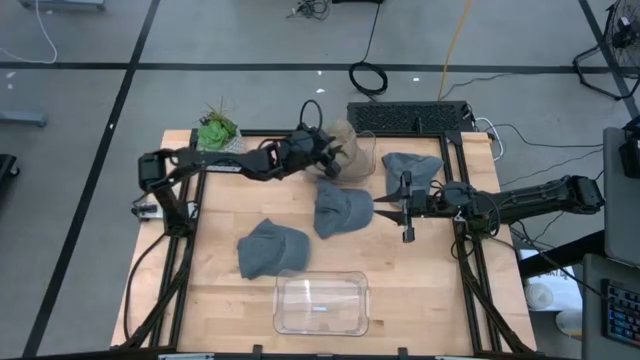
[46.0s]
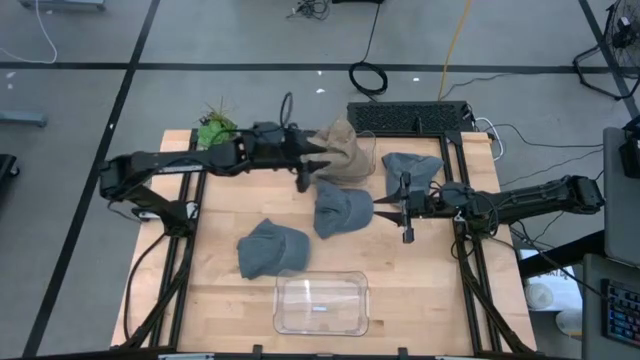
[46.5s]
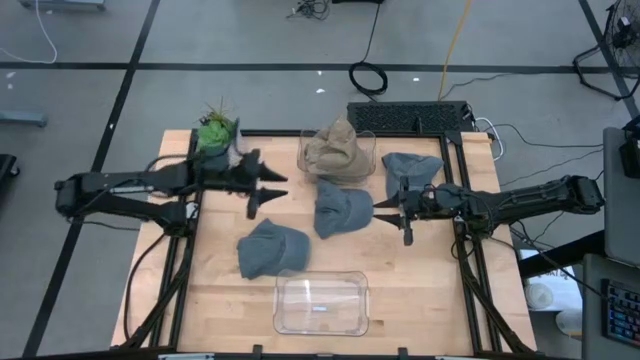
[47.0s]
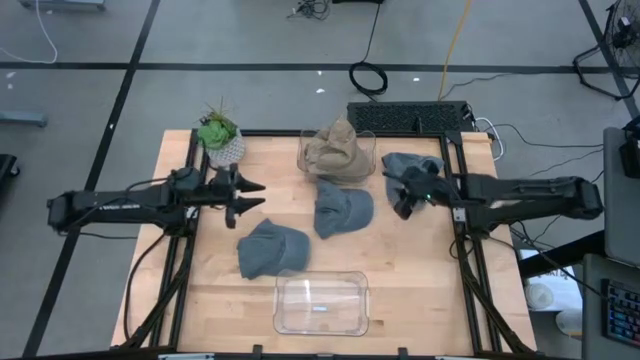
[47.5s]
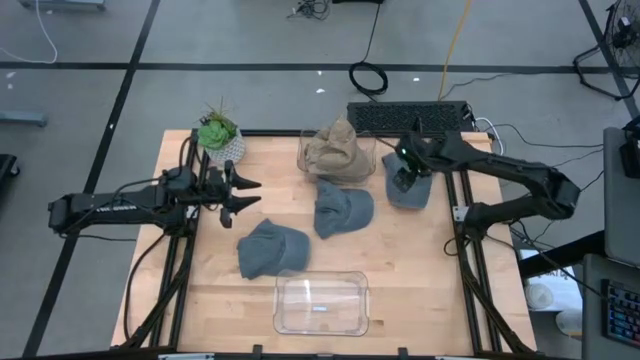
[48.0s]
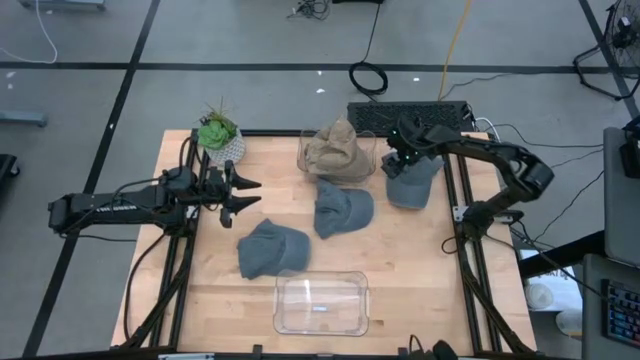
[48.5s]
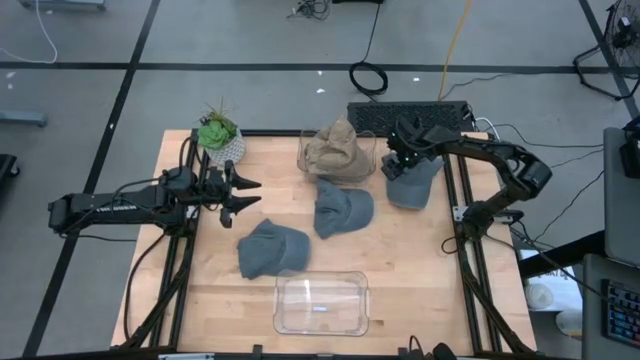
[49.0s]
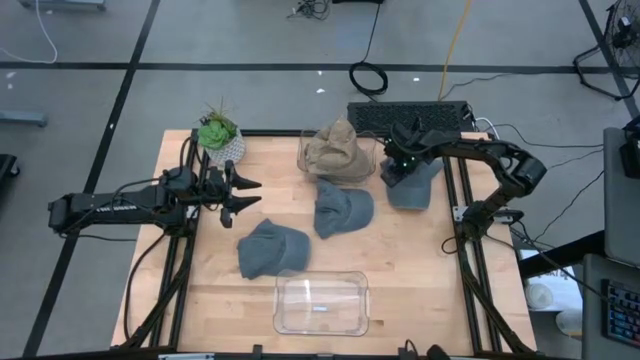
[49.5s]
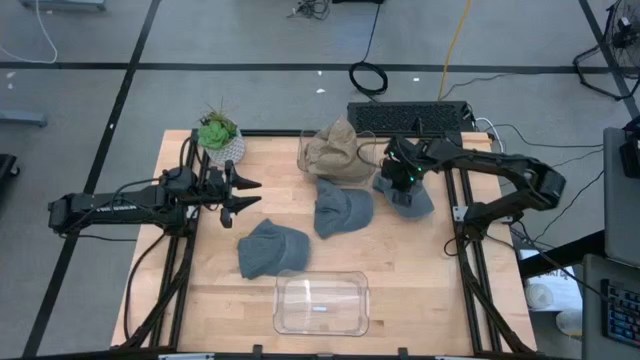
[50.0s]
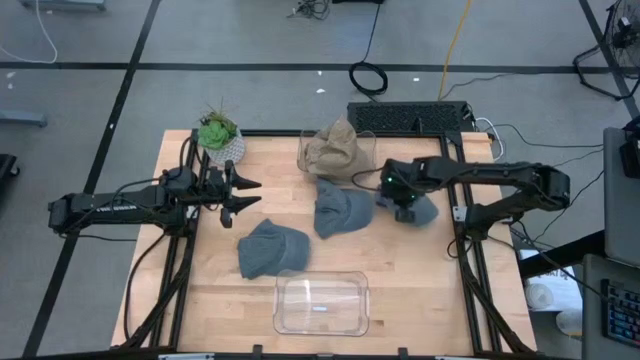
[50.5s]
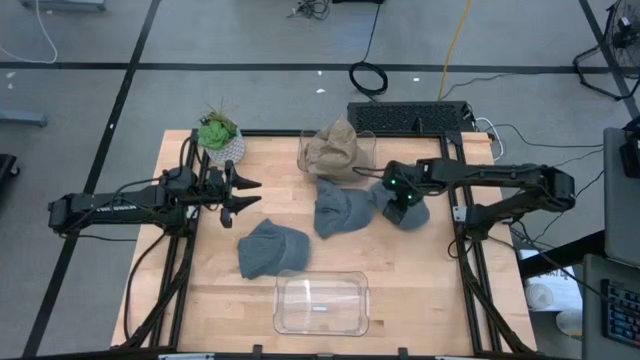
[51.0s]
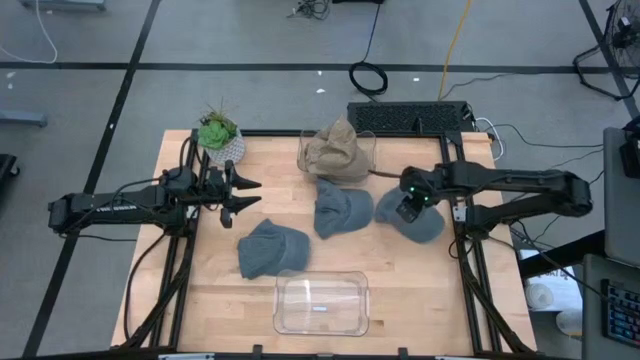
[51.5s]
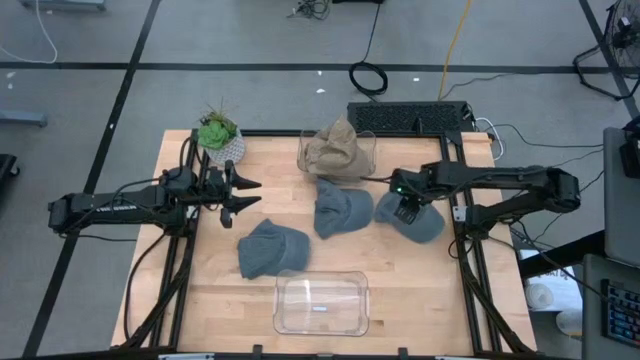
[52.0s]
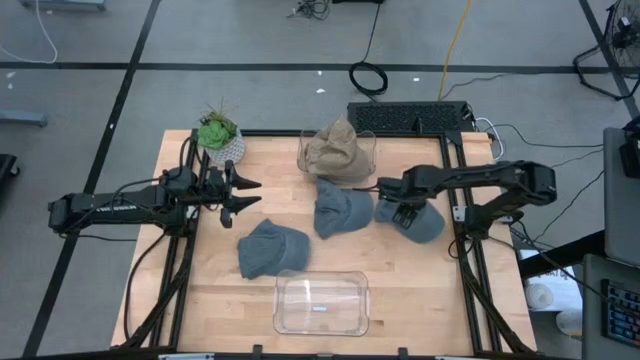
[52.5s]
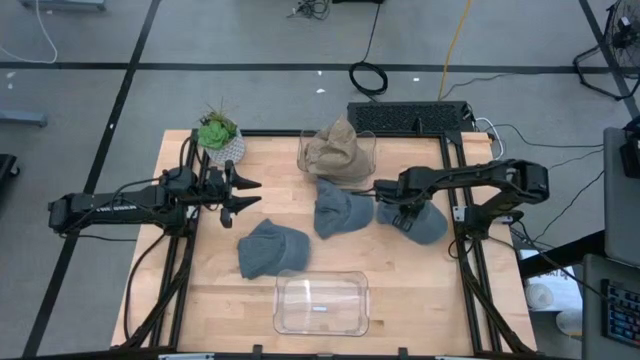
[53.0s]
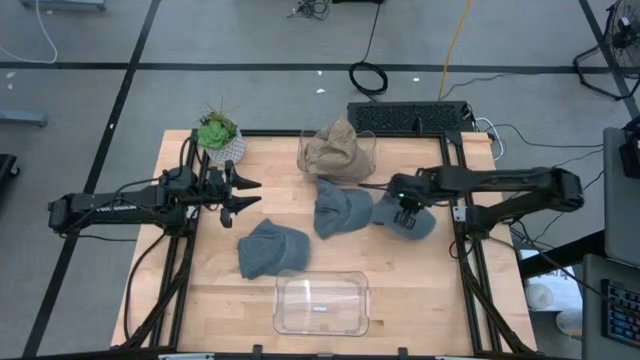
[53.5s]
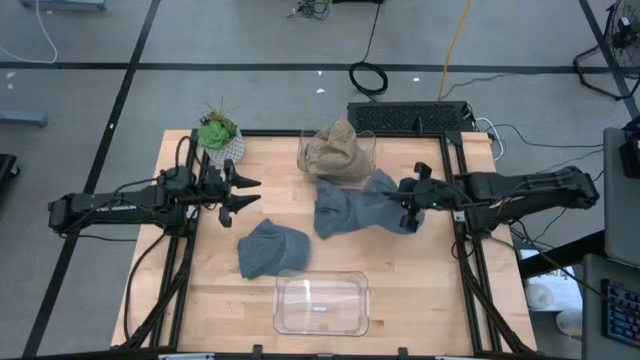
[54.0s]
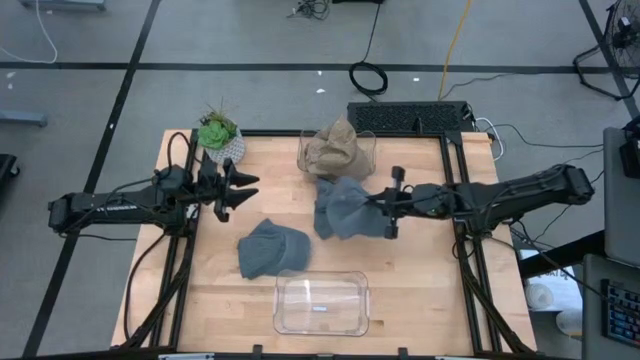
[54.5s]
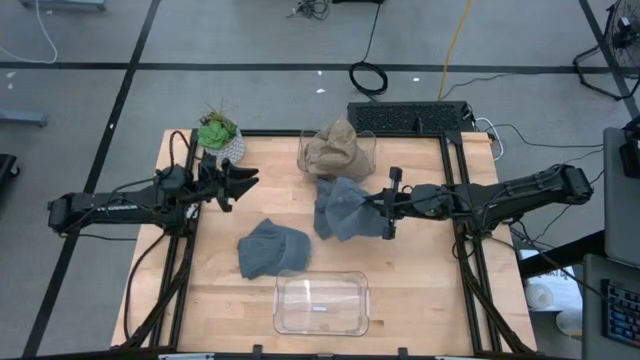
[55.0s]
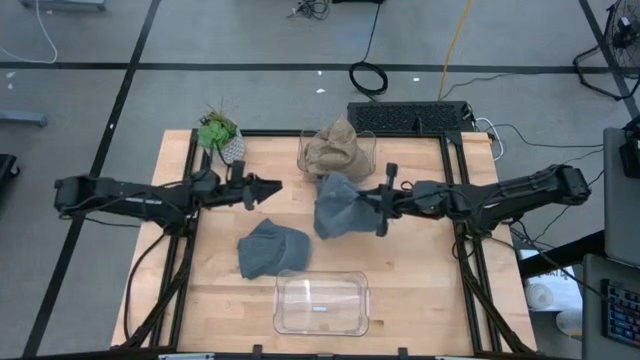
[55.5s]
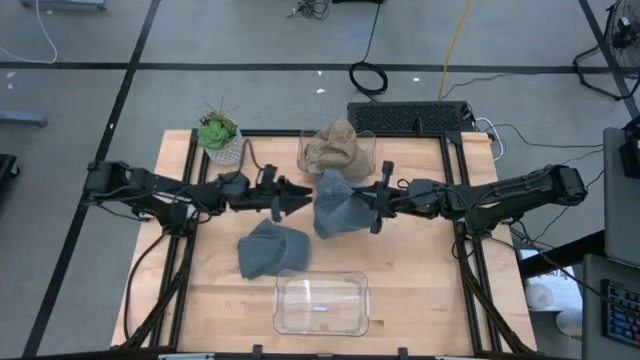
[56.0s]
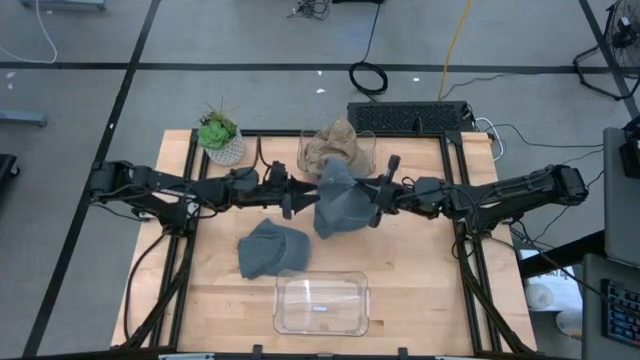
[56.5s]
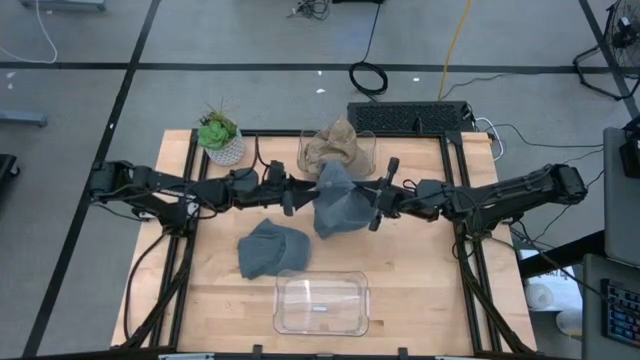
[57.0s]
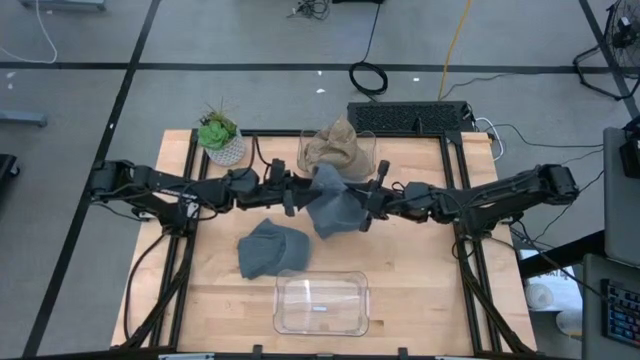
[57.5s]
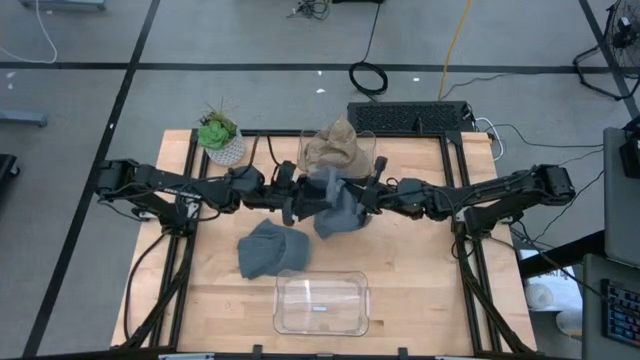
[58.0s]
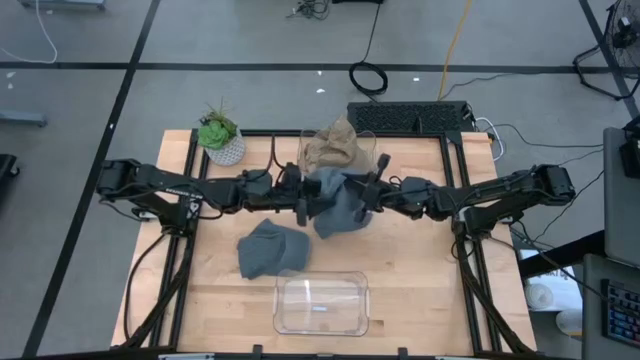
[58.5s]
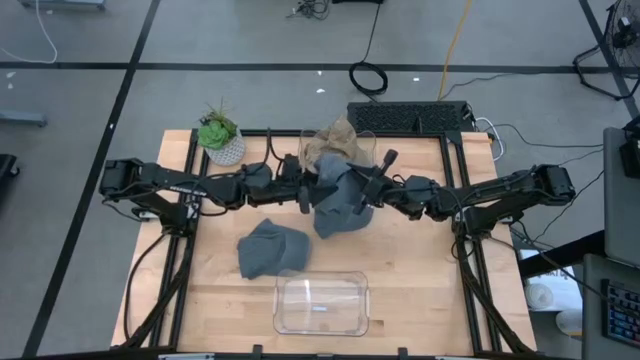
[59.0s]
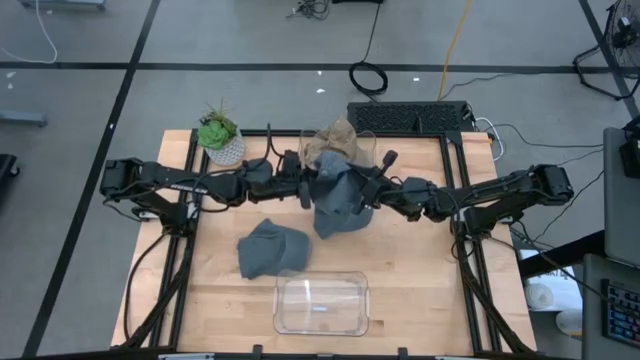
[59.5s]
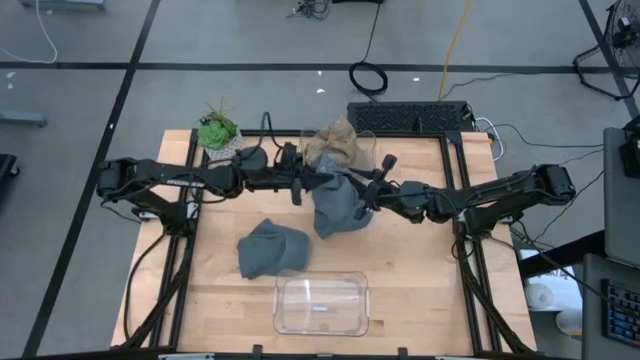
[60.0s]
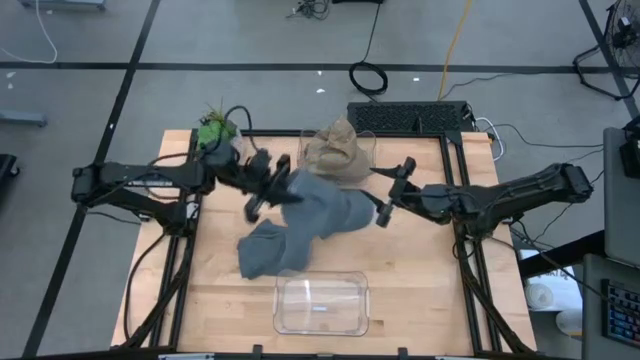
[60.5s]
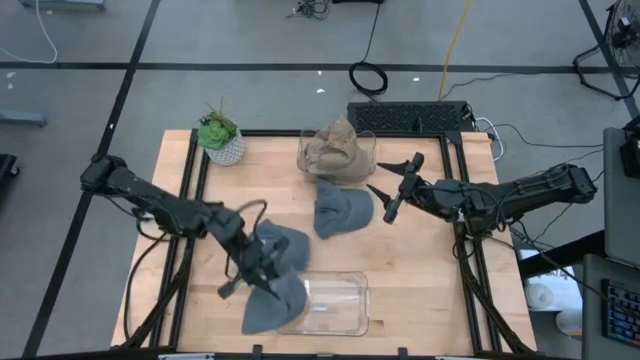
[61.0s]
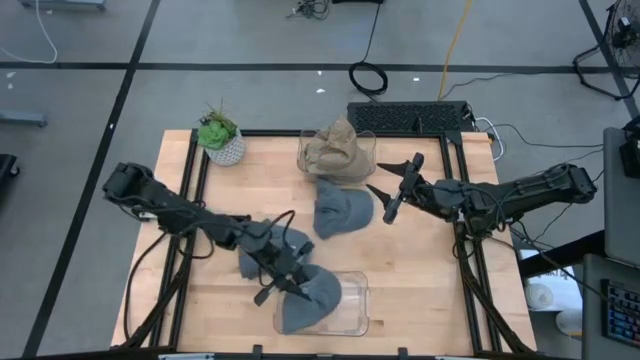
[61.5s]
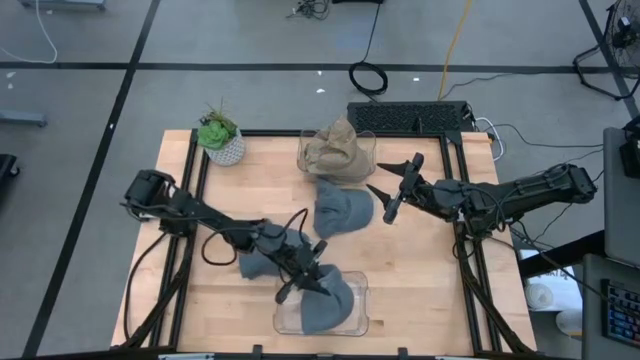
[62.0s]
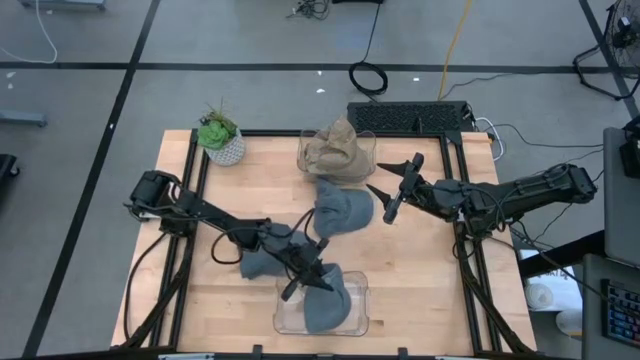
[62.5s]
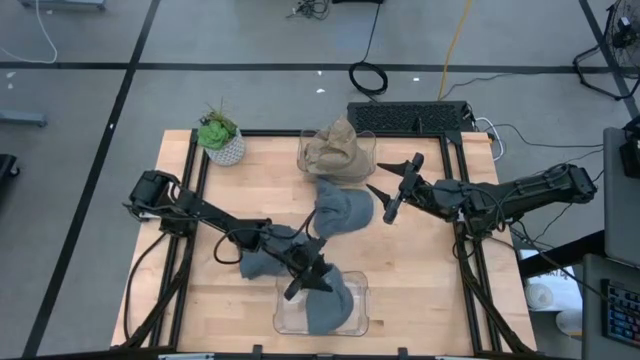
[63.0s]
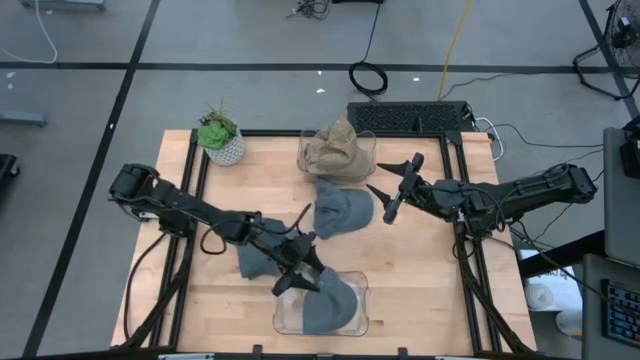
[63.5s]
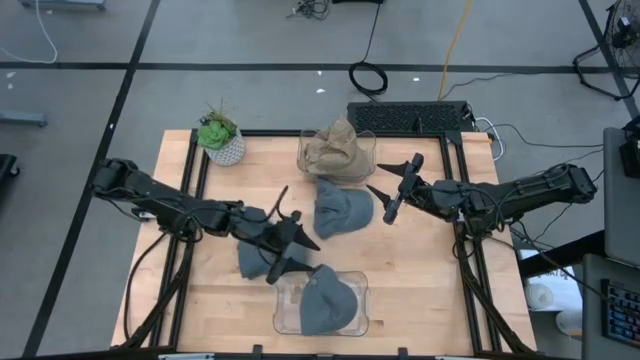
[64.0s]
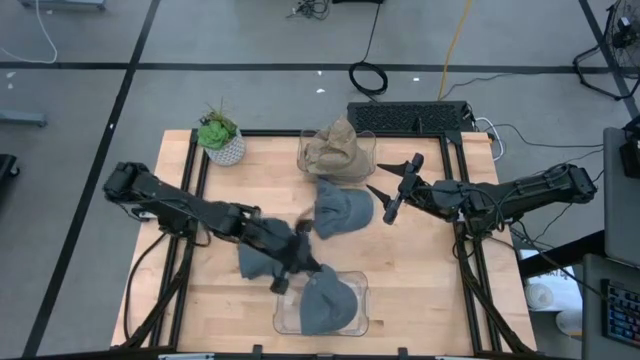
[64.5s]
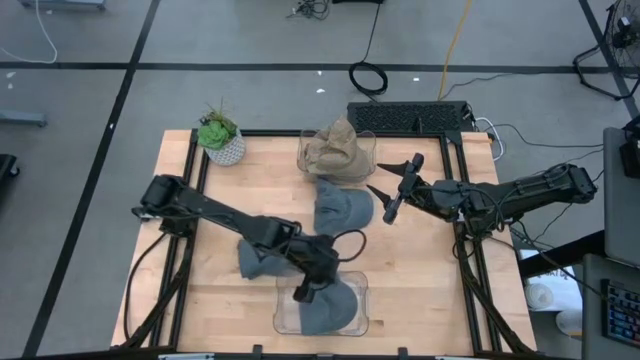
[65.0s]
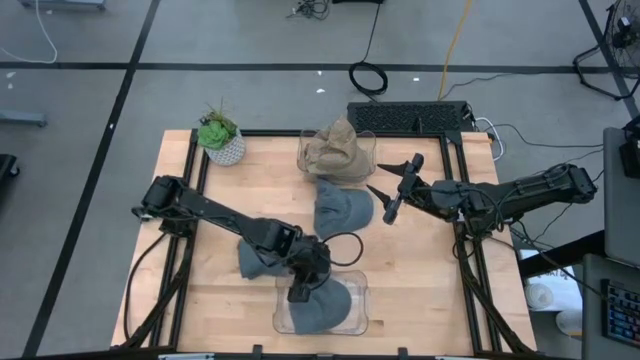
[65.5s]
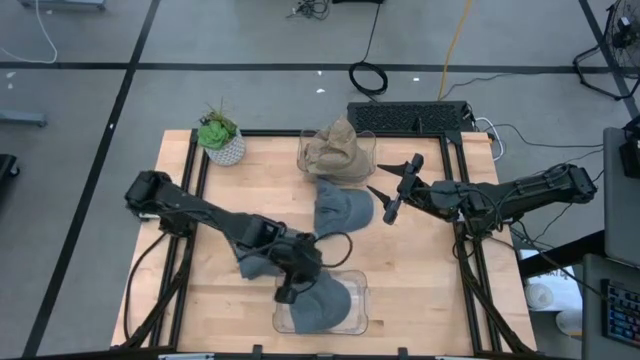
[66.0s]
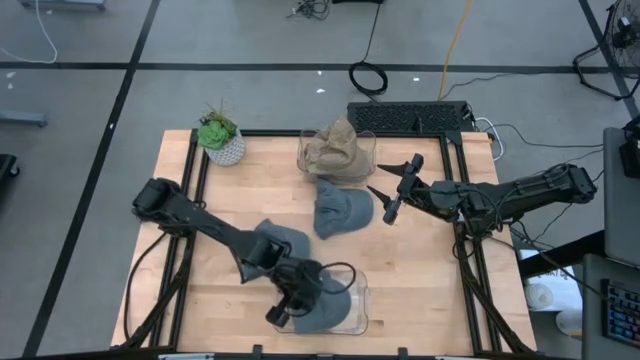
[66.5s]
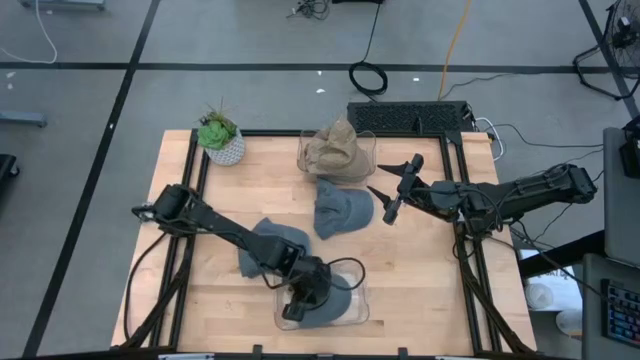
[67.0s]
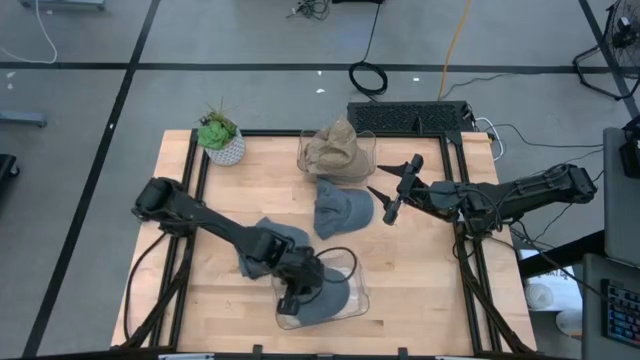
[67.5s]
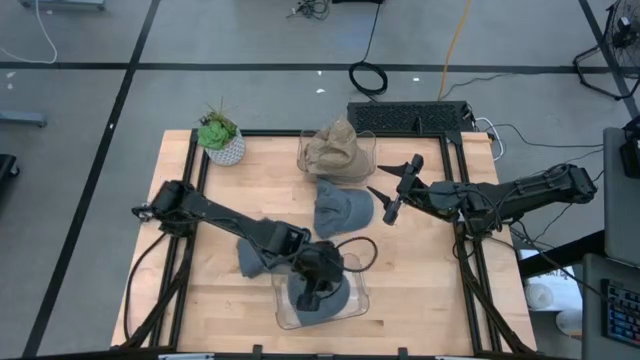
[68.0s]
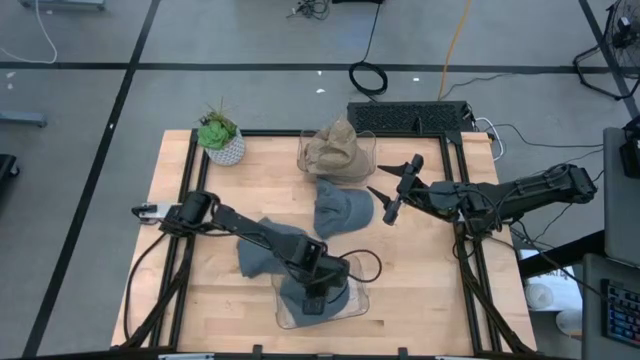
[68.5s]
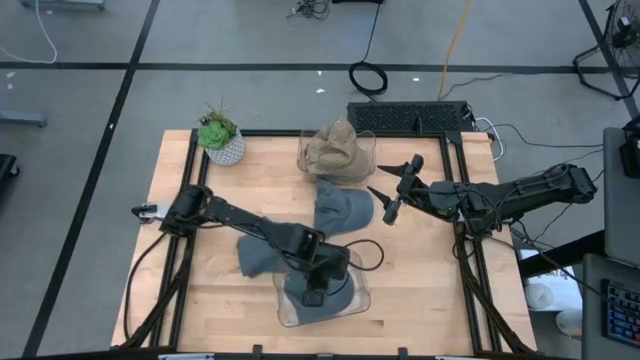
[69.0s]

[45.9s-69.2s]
Task: Pick & Place hat
Put the top right blue cap into the bottom transparent bin
